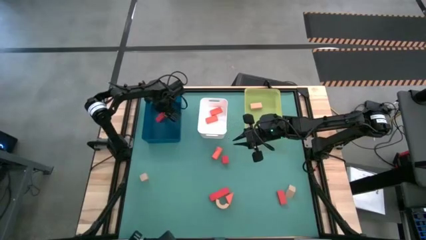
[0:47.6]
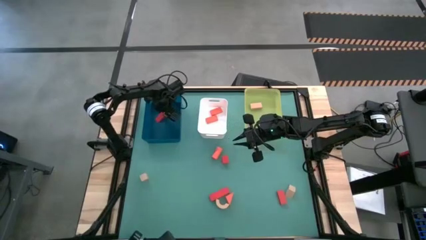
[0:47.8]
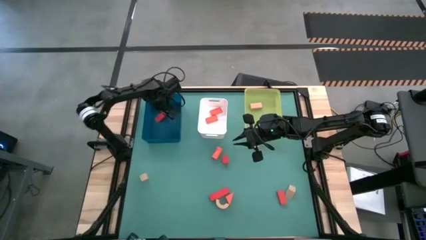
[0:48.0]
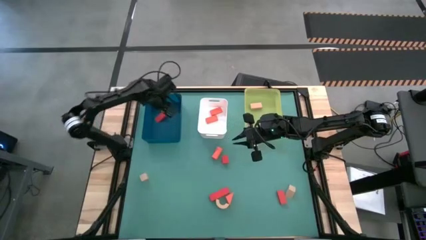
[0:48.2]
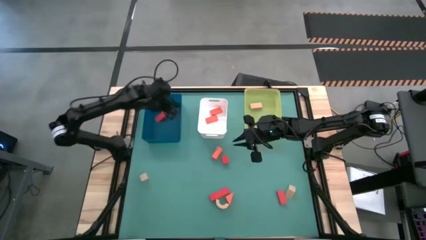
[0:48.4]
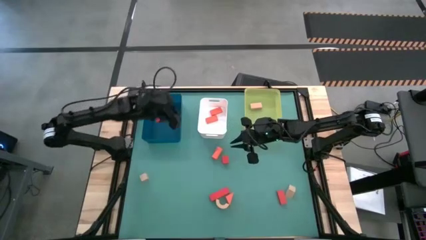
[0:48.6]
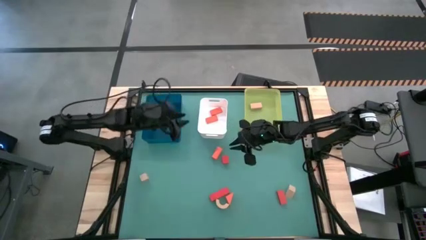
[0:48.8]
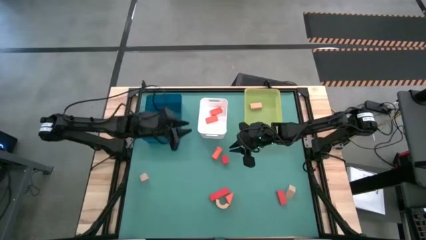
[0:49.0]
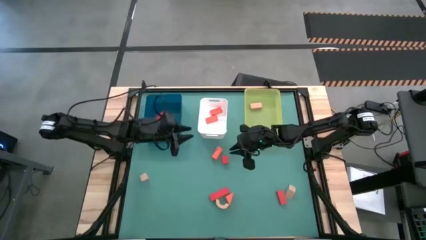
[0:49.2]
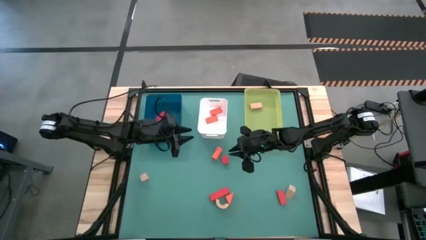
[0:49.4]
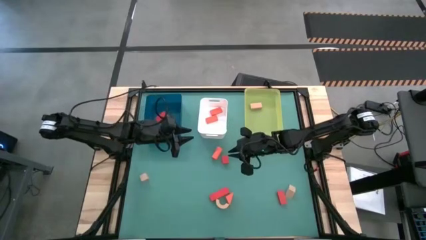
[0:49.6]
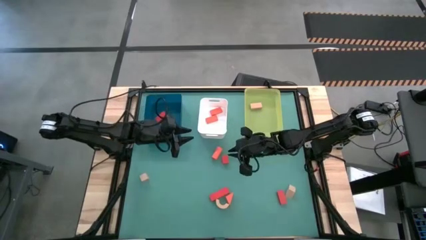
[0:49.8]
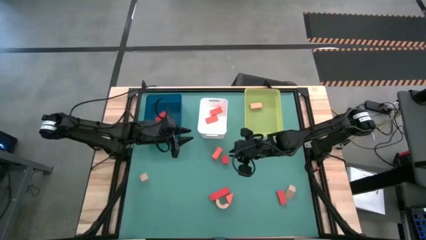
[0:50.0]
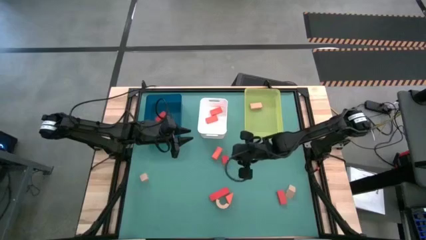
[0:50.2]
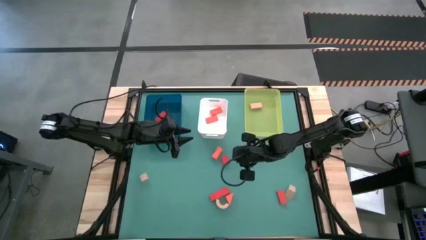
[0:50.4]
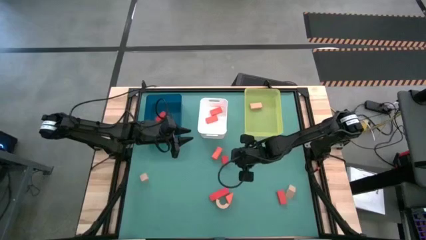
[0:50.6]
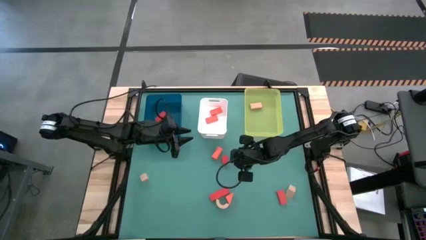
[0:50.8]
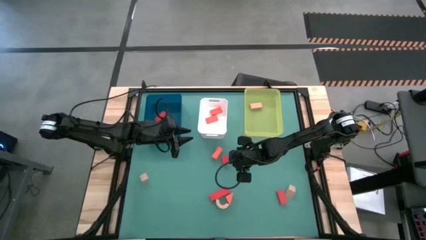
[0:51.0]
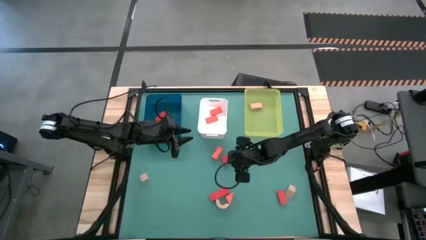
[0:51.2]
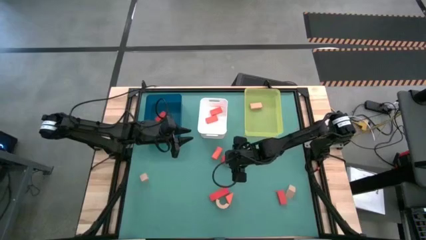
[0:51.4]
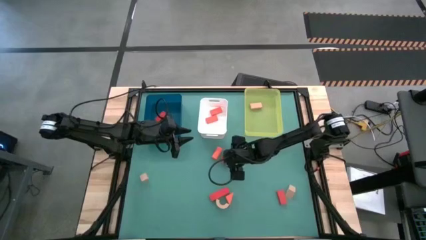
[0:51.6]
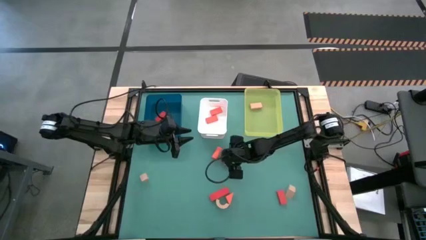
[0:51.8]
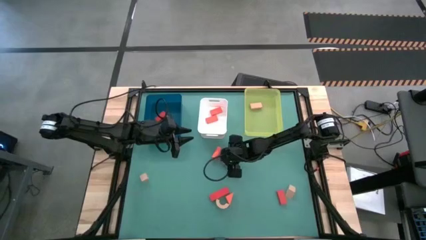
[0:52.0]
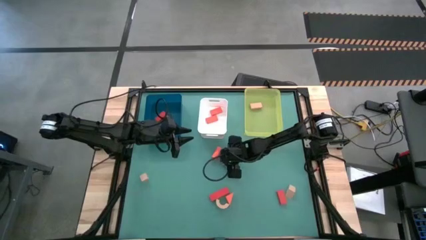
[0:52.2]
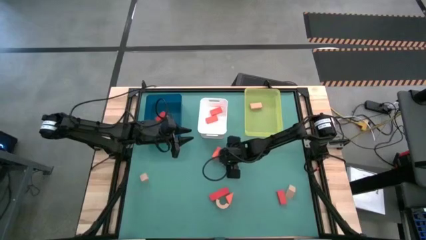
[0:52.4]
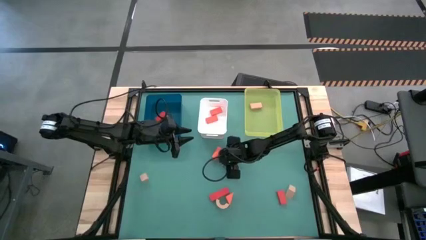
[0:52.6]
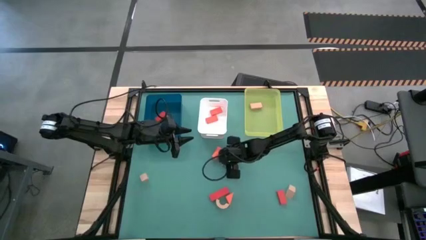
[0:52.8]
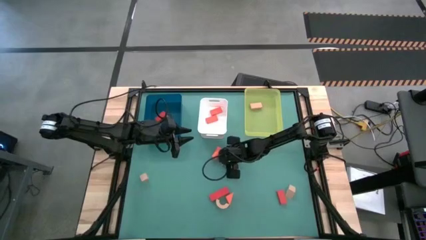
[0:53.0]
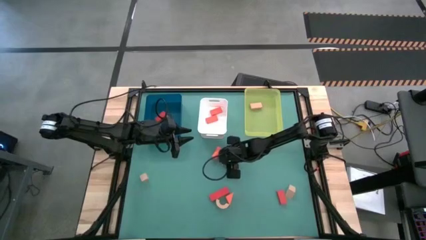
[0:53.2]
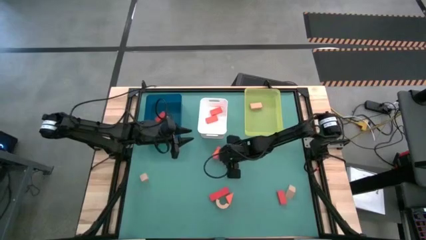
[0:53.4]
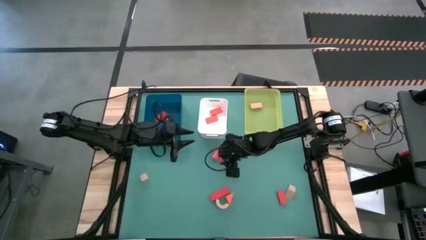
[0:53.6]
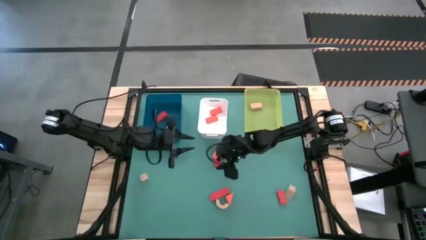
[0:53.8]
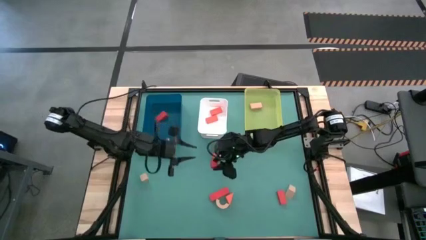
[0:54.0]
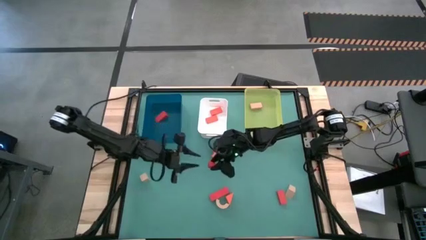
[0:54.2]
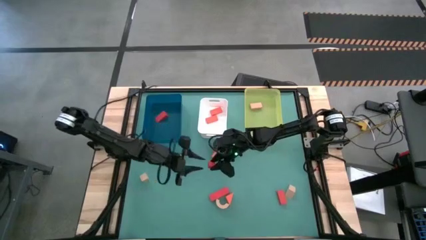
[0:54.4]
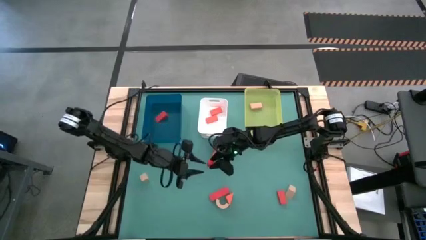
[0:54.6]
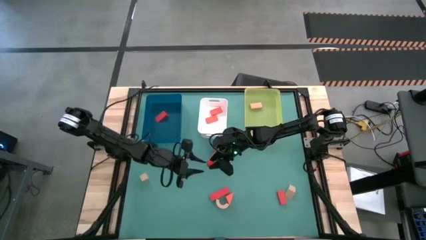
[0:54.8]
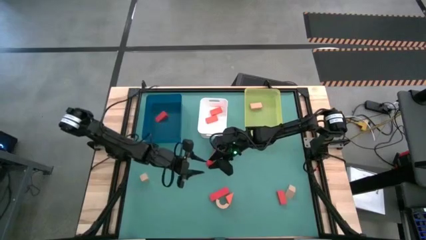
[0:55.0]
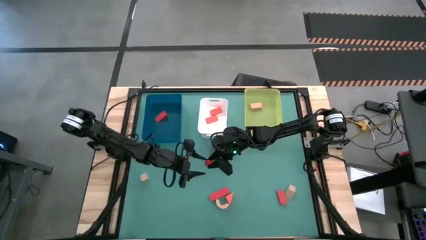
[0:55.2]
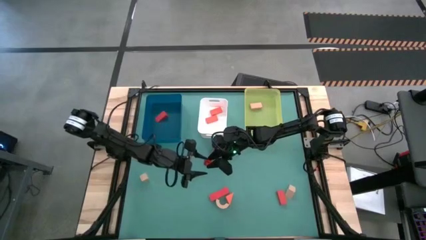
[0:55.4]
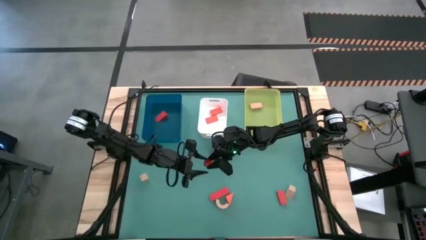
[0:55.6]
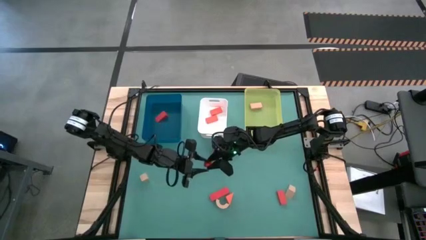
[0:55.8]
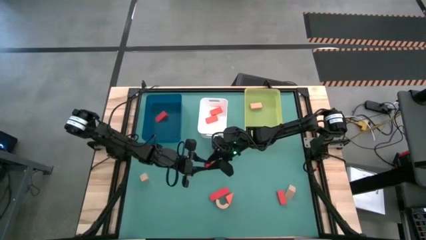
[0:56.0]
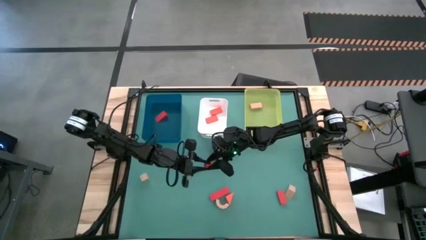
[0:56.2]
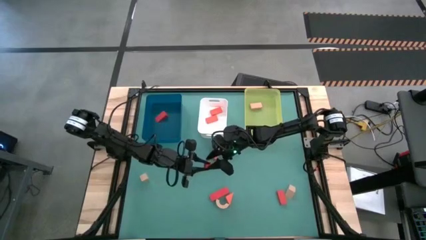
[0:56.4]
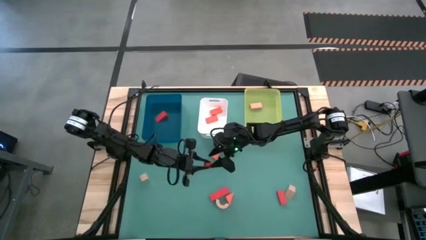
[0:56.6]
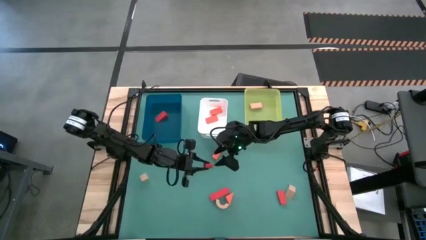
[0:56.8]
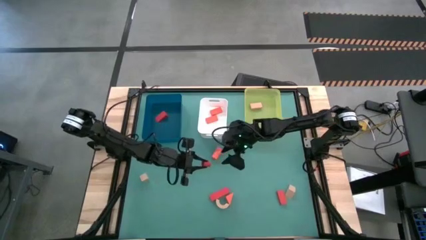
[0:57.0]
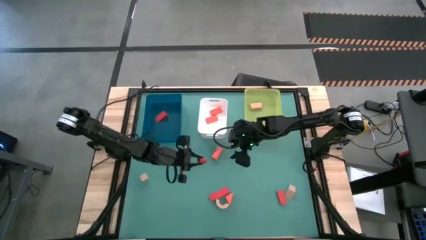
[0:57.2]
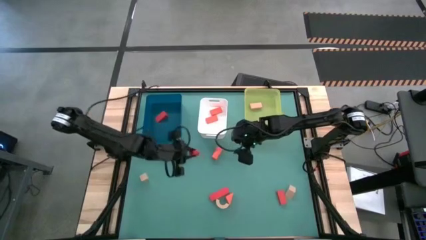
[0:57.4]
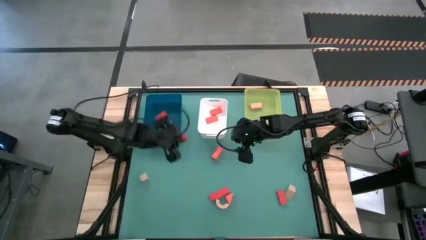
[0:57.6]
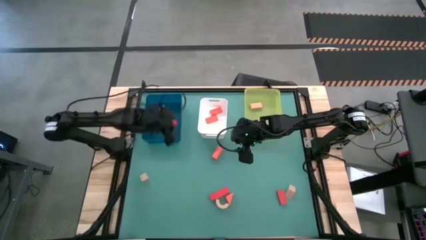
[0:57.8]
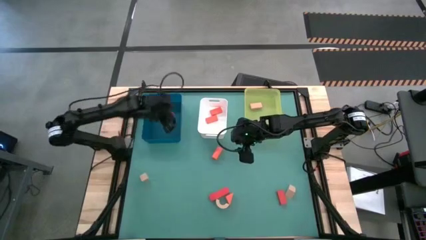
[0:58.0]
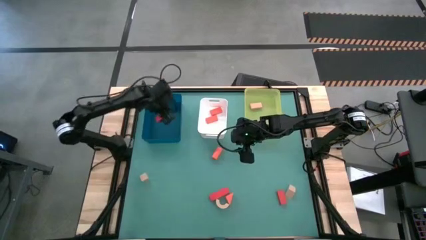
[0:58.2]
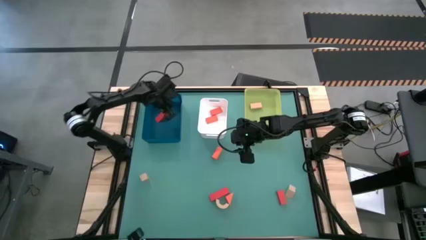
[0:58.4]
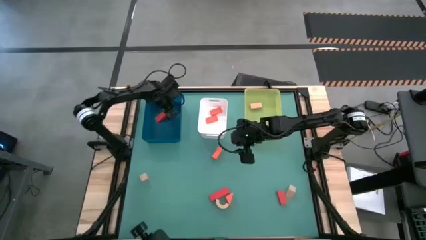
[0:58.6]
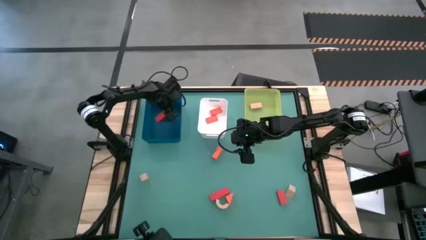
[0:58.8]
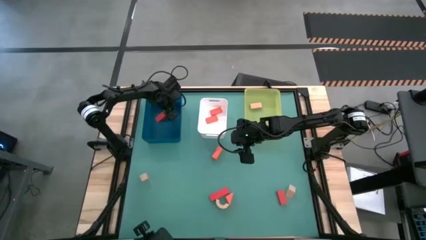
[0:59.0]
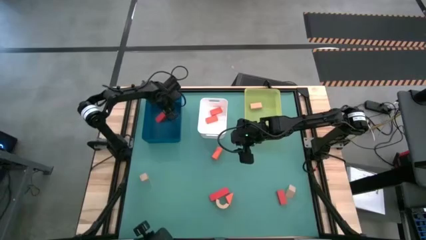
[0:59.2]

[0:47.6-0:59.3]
Task: Sort & place blocks by color
Put the top left red block into the blue bin
